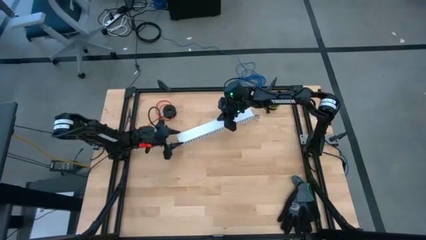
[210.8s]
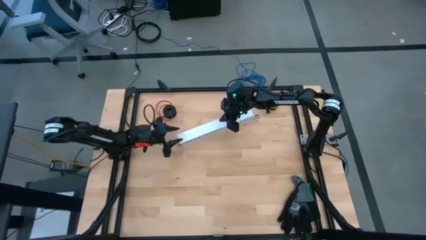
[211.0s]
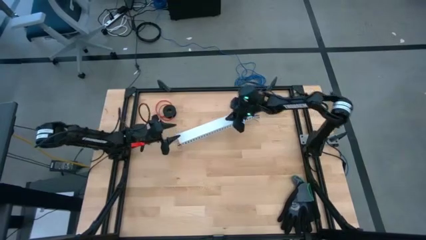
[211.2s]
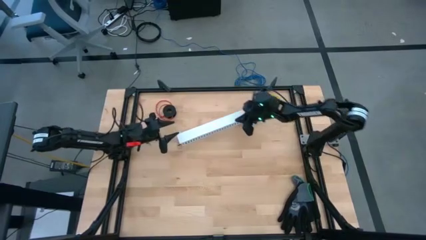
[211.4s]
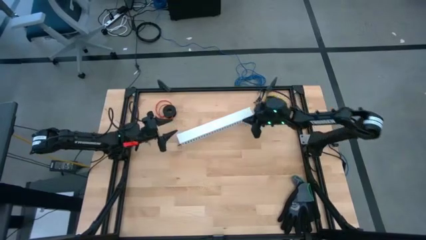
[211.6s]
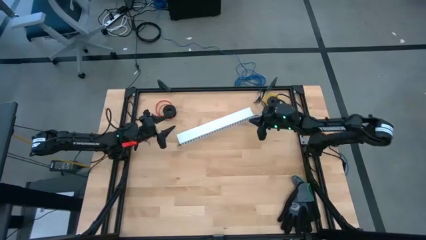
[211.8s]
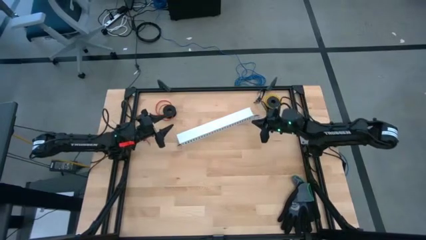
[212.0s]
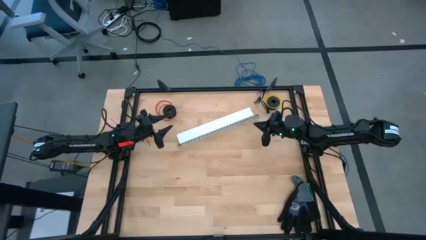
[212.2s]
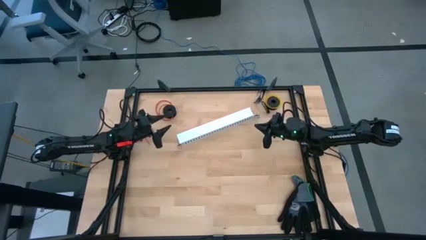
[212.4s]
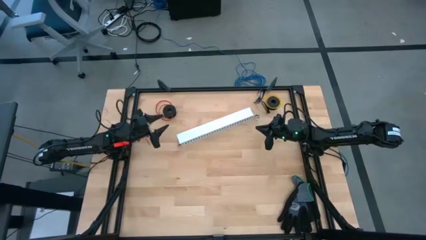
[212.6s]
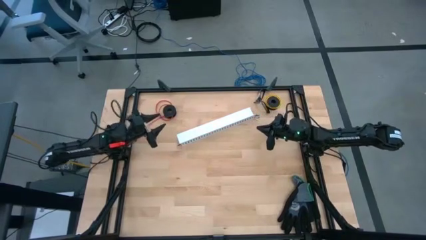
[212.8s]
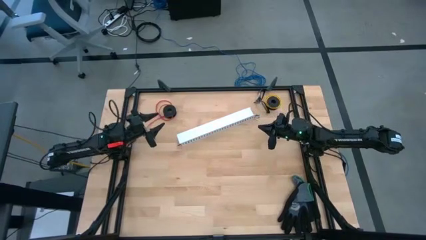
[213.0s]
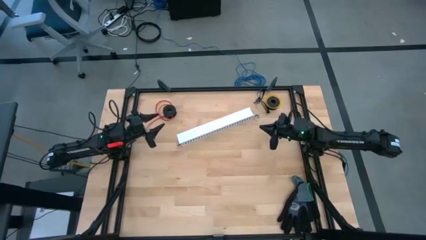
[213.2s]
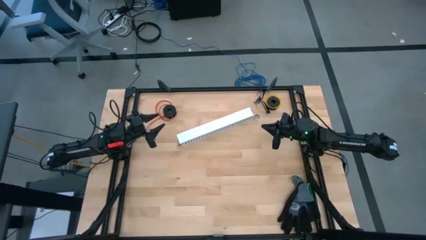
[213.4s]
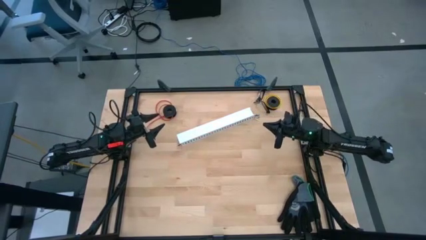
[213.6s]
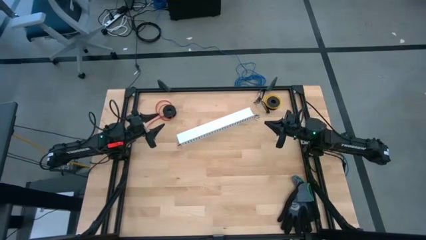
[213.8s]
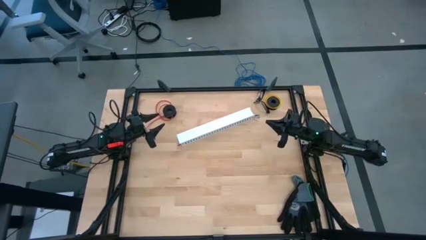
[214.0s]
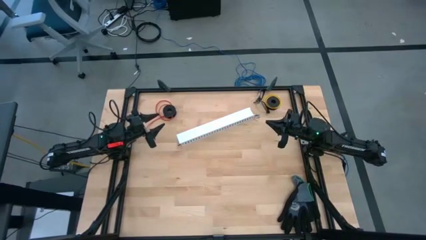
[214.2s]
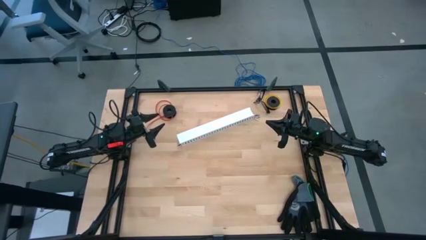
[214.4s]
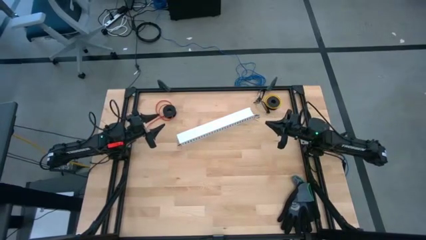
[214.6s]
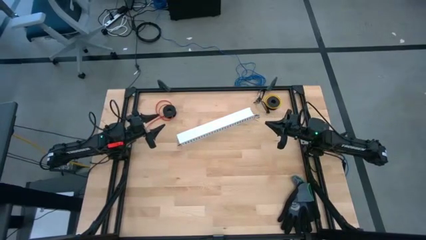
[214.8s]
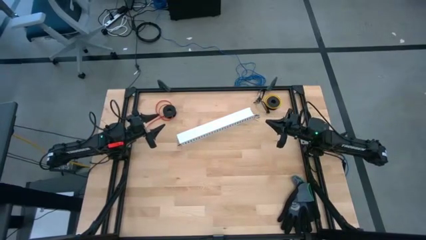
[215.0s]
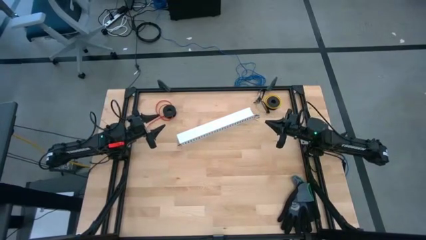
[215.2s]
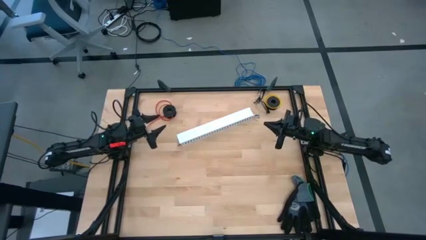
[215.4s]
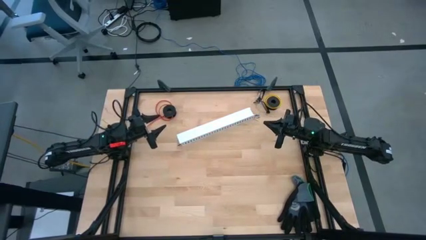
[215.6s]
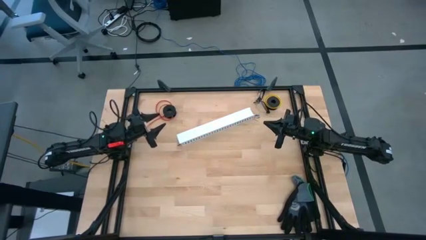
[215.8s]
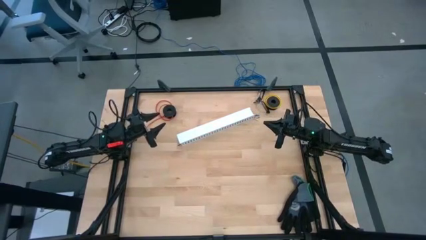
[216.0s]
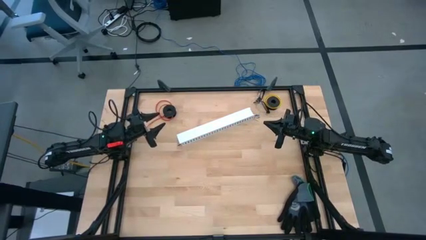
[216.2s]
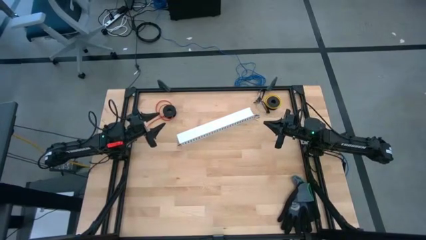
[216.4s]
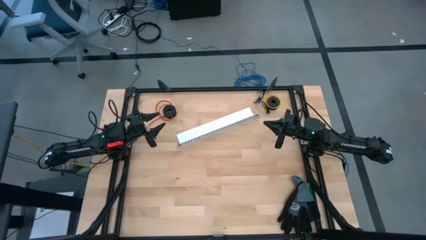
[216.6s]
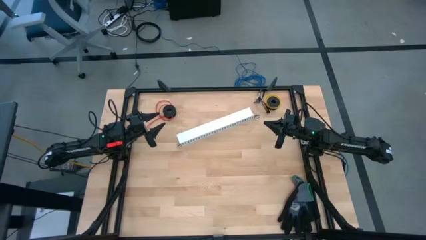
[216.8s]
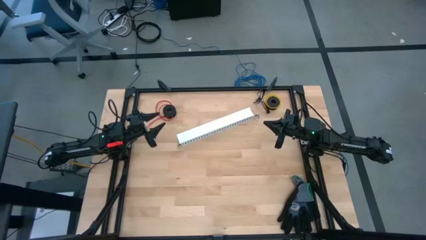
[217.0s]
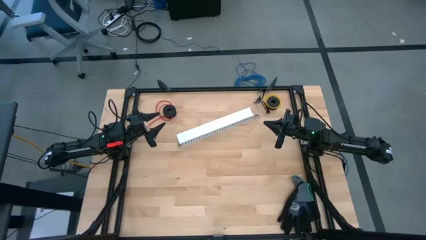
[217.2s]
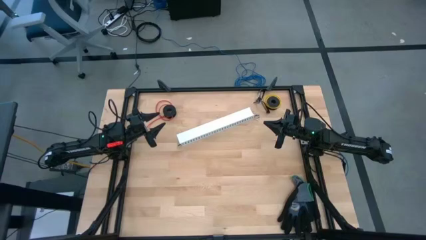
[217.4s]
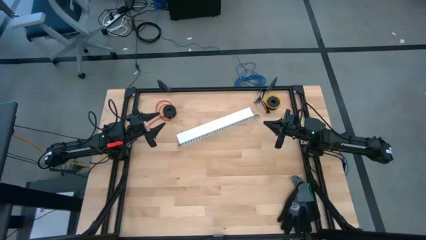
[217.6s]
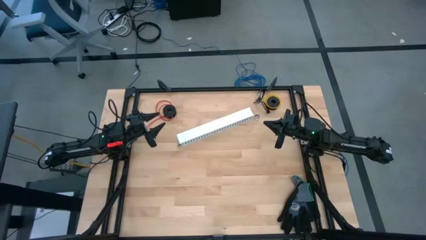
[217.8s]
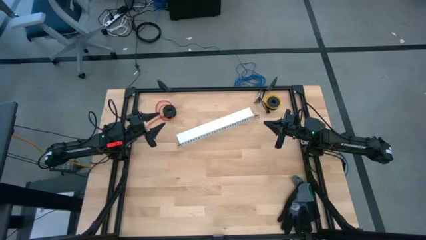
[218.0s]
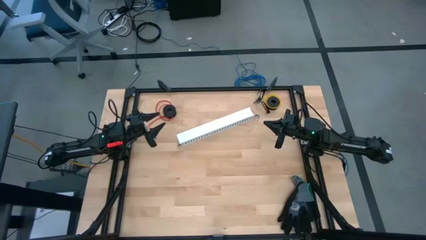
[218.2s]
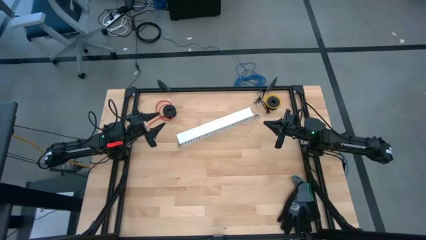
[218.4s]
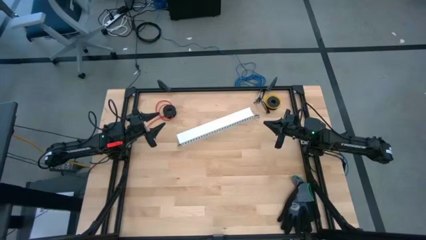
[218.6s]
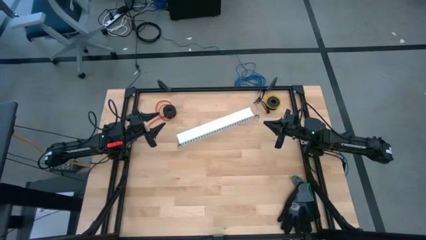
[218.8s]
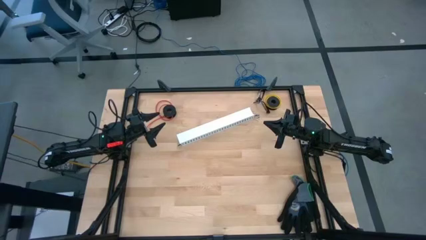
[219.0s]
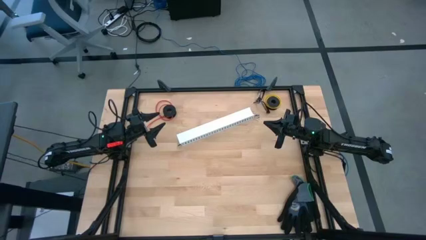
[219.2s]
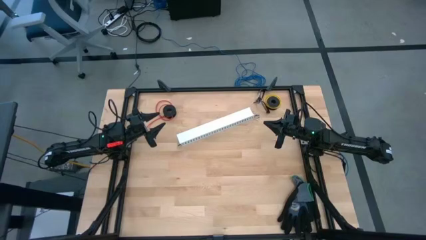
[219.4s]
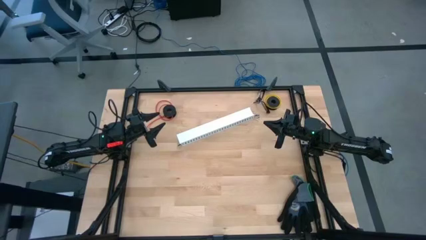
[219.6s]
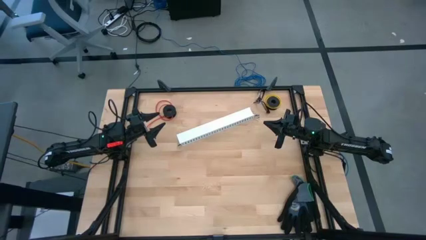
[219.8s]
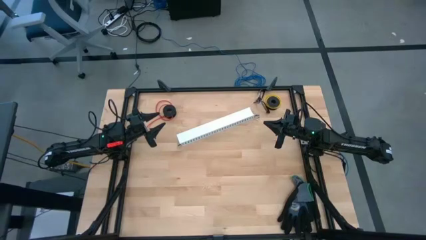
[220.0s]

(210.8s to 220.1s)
Task: Ziptie cables
Return to Home Position

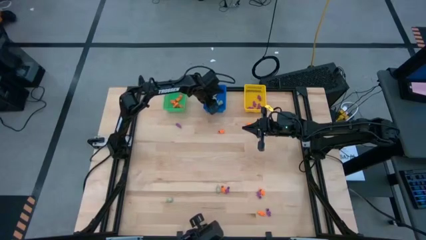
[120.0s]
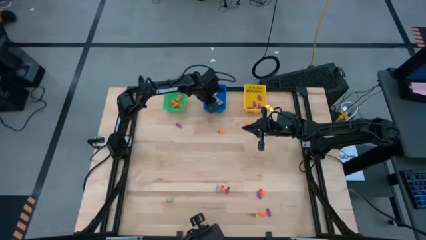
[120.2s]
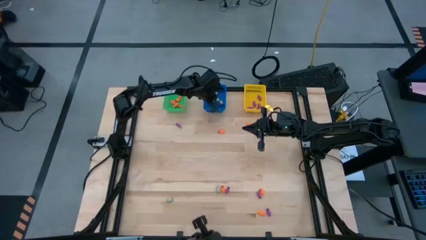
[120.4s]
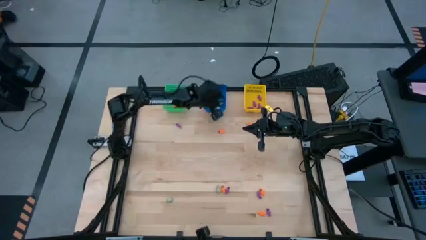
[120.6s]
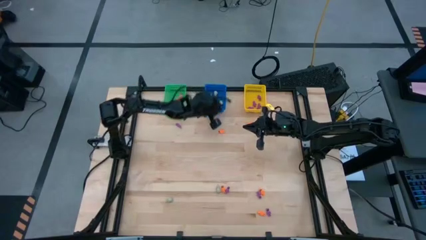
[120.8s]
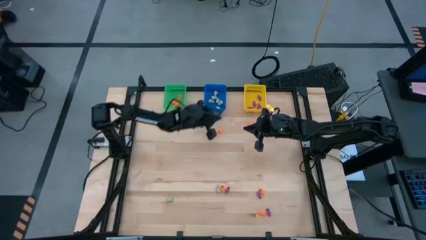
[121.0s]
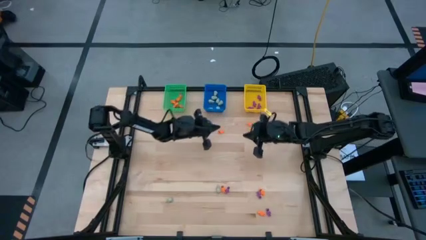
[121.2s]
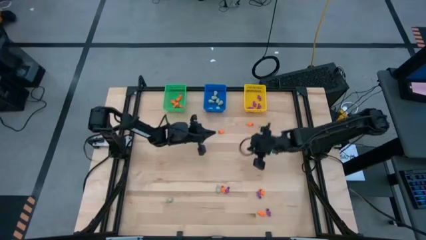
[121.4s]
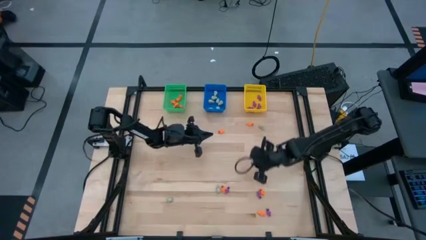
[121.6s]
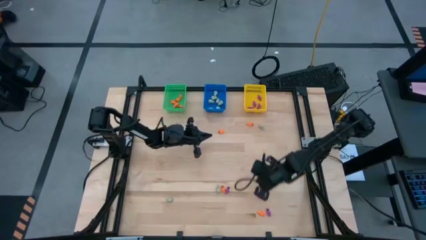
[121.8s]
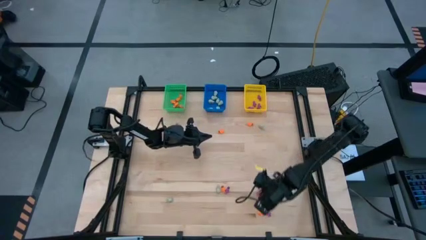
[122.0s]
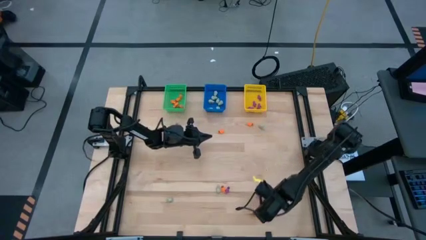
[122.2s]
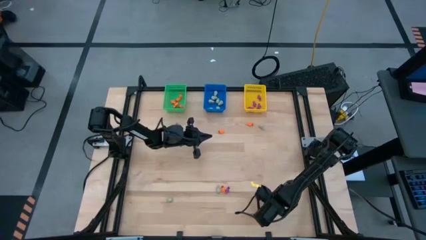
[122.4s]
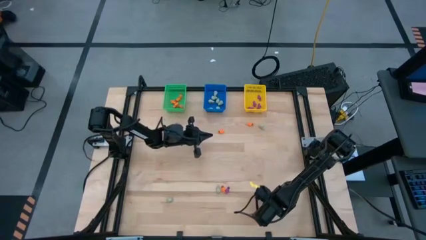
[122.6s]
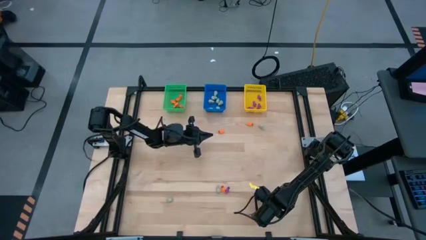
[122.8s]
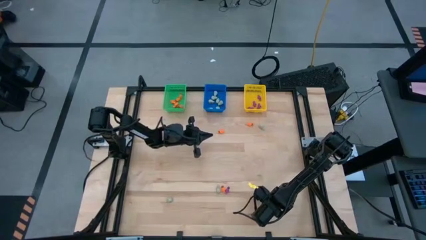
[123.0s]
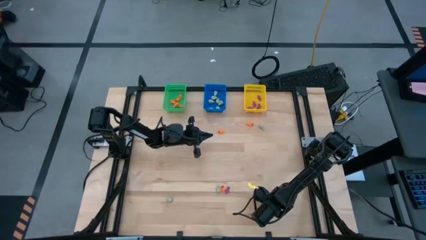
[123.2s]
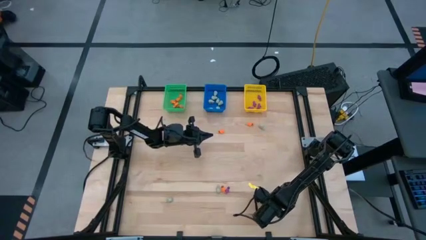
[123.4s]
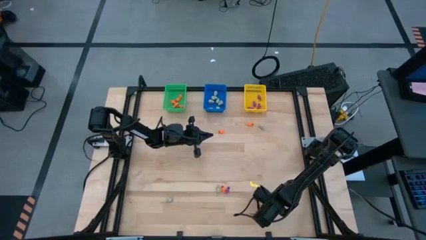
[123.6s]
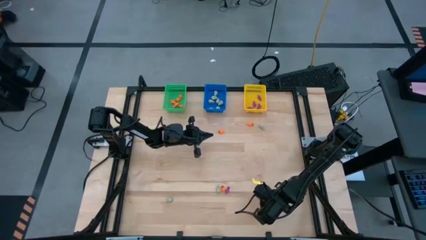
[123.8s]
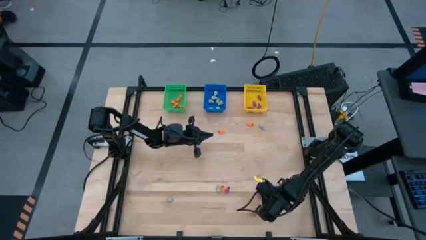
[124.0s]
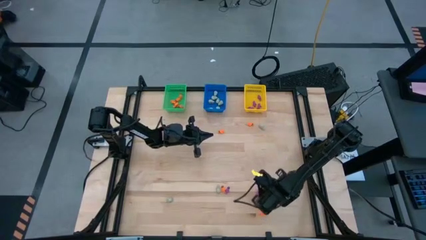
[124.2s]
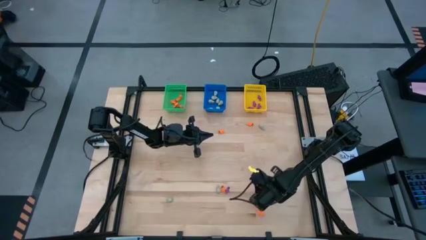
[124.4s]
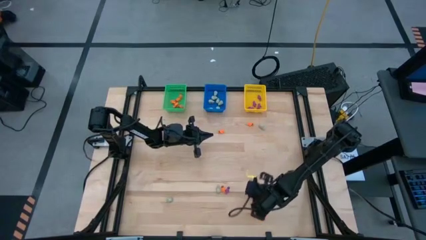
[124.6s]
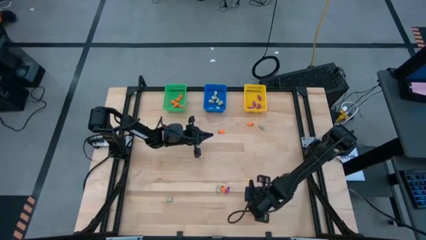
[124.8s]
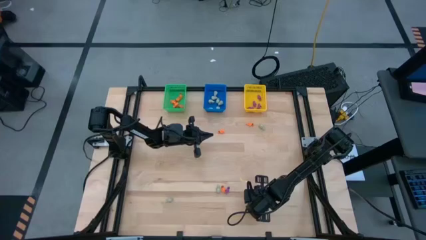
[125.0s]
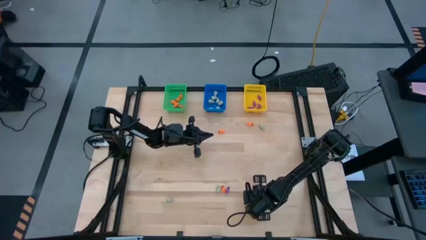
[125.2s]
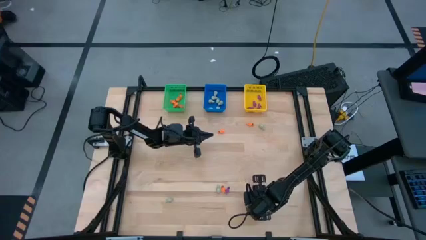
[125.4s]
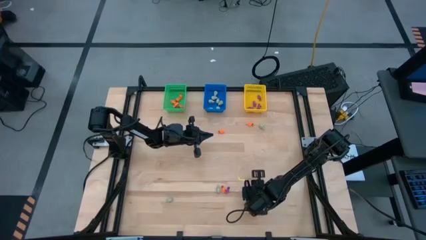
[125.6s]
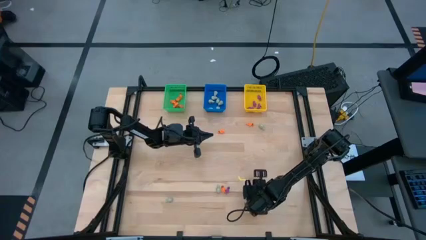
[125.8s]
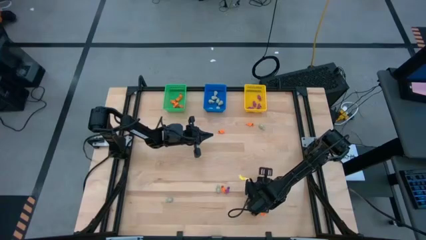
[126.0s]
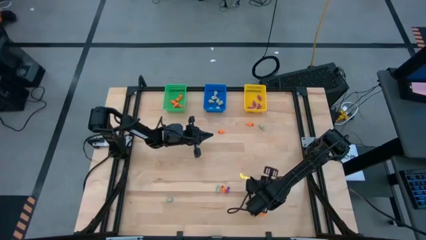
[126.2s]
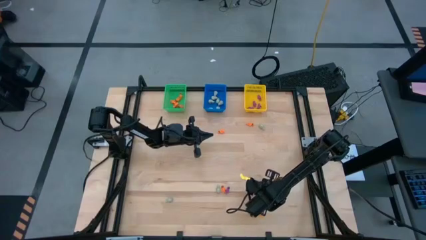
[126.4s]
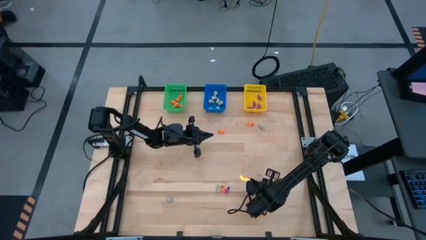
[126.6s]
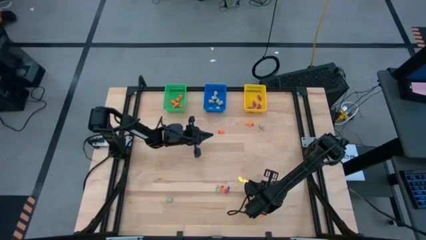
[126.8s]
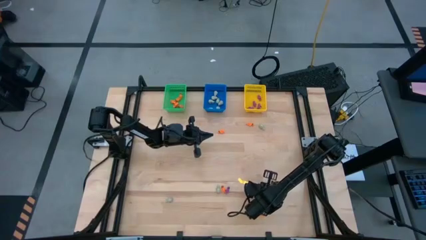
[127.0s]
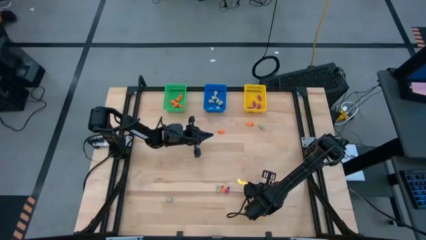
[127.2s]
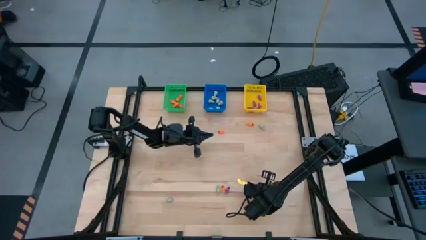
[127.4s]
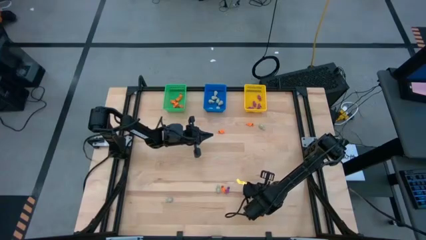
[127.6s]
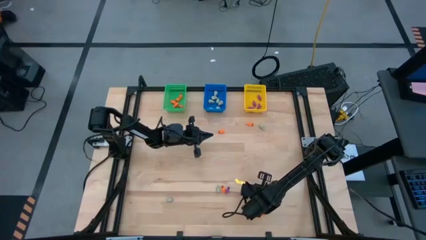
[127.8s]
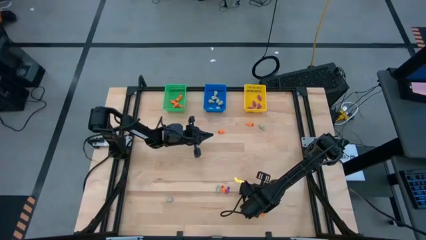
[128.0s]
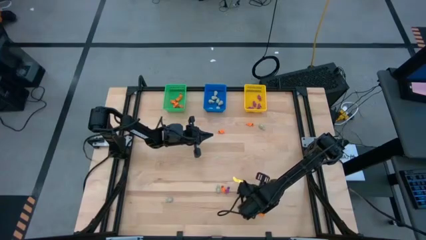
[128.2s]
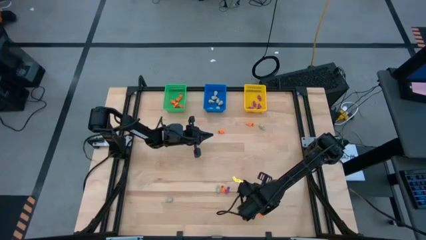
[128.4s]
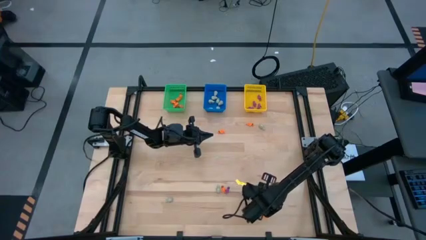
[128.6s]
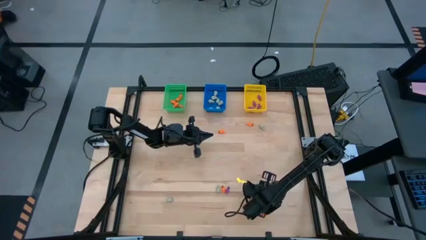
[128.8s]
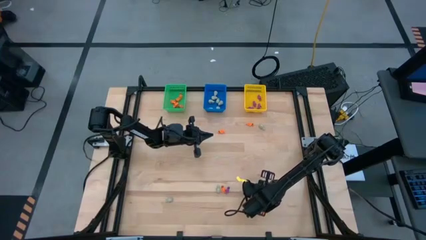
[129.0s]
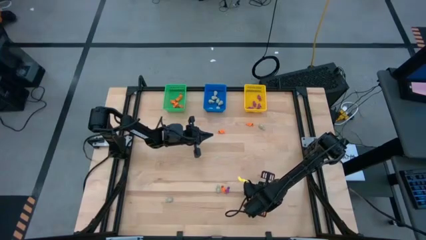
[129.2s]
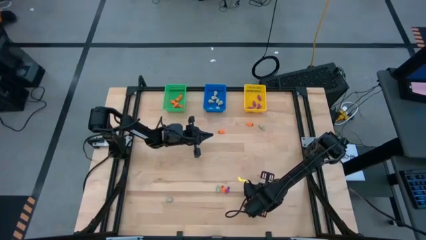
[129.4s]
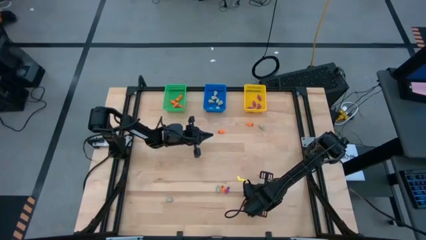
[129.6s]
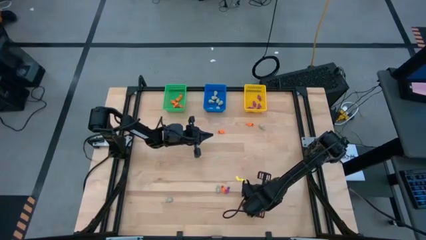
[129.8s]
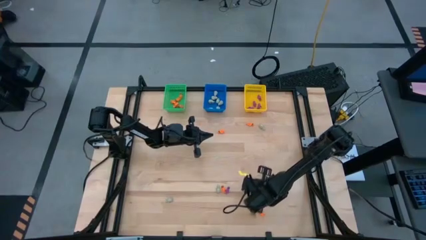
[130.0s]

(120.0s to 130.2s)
Task: Sort Halloween decoration
Put the purple skeleton toy into the yellow bin
